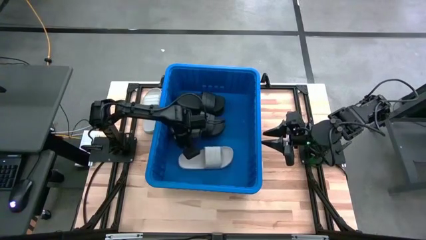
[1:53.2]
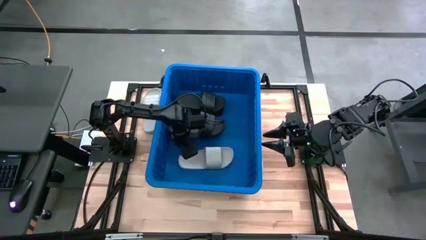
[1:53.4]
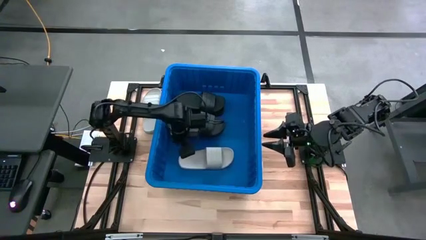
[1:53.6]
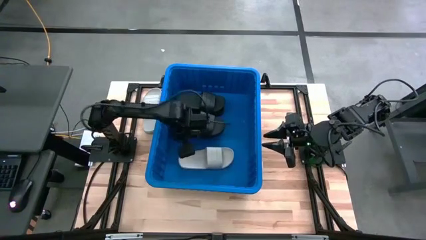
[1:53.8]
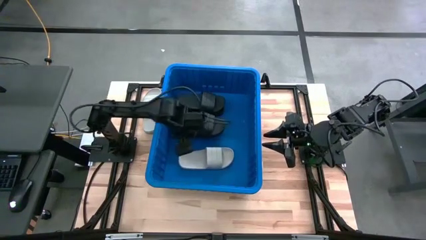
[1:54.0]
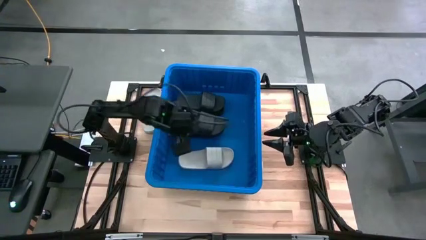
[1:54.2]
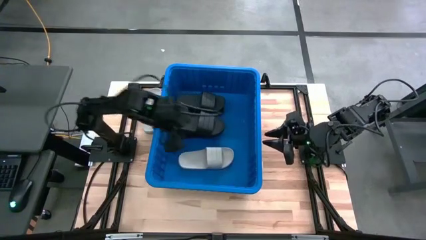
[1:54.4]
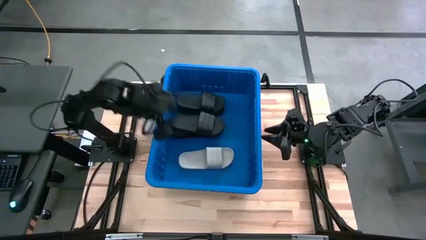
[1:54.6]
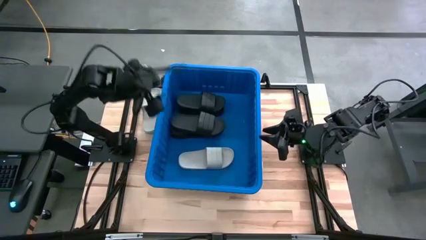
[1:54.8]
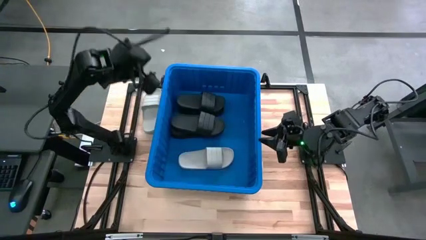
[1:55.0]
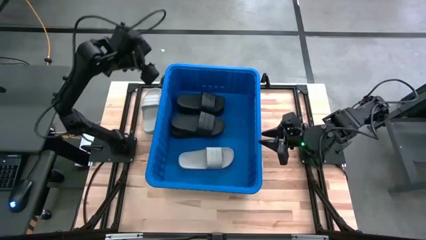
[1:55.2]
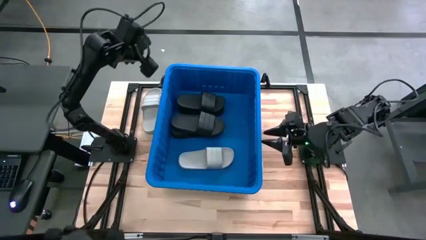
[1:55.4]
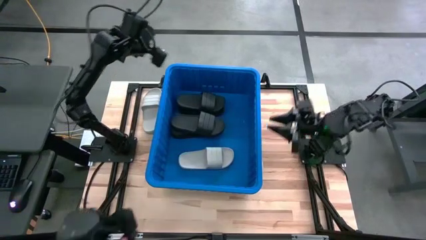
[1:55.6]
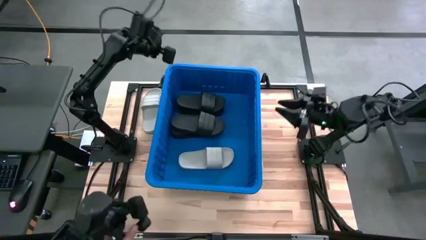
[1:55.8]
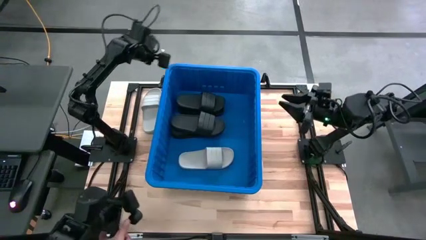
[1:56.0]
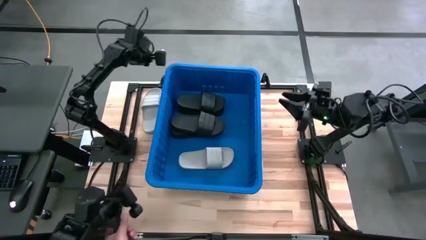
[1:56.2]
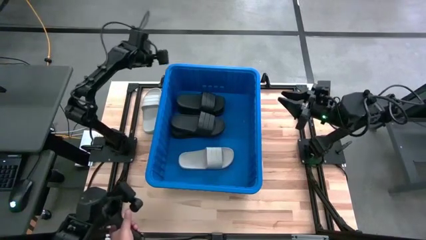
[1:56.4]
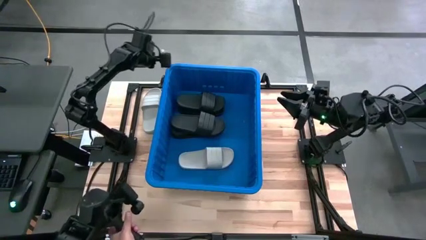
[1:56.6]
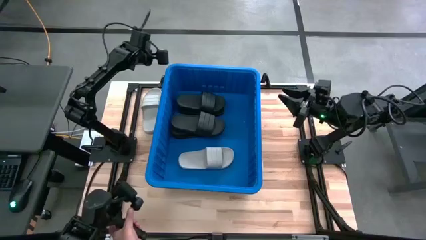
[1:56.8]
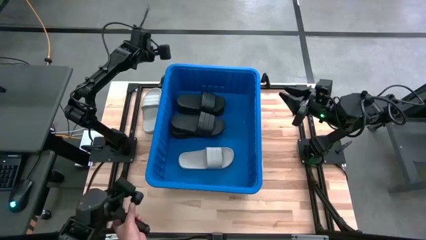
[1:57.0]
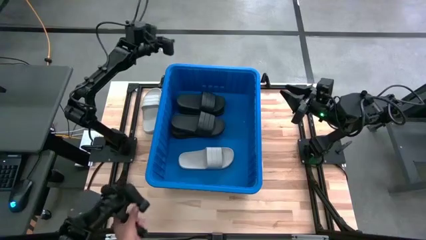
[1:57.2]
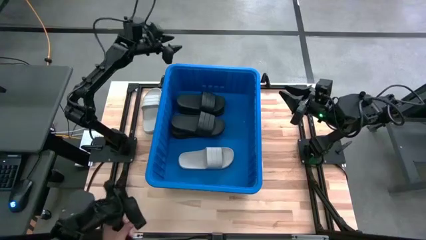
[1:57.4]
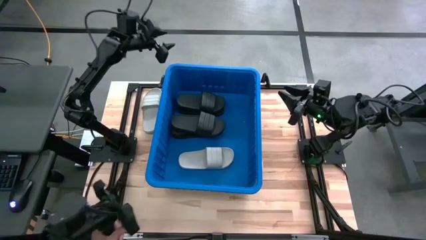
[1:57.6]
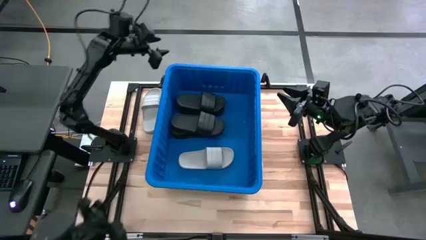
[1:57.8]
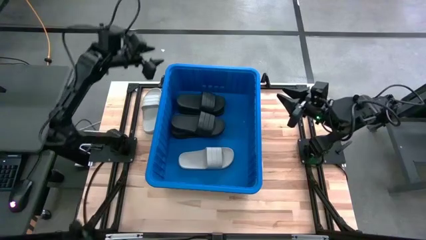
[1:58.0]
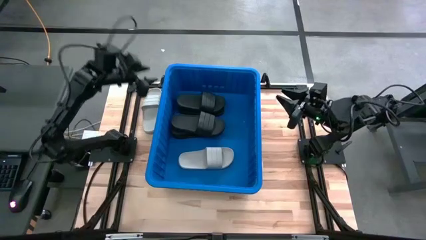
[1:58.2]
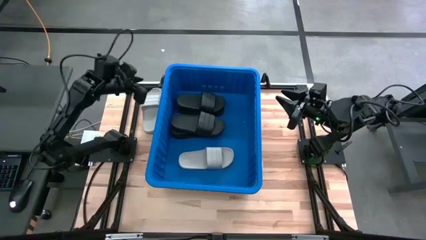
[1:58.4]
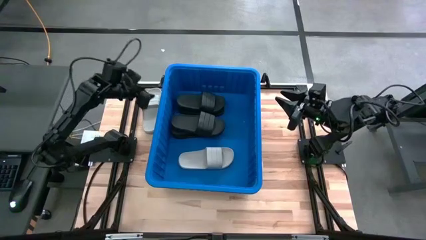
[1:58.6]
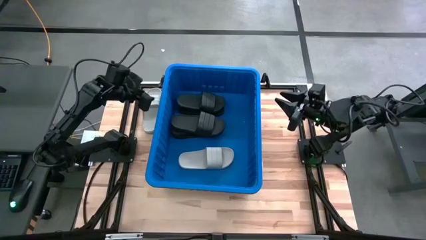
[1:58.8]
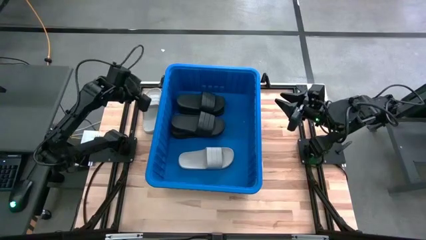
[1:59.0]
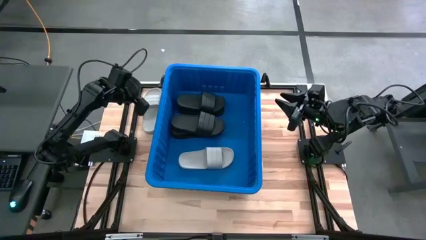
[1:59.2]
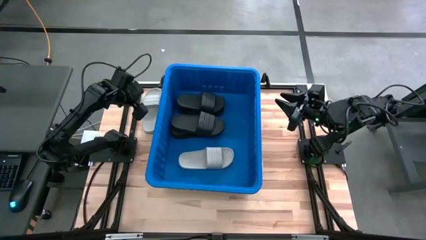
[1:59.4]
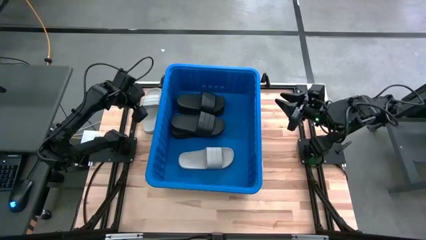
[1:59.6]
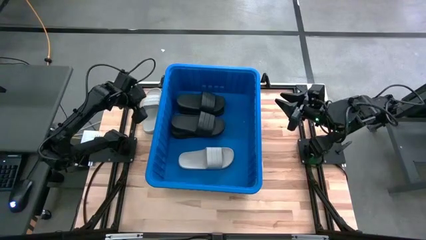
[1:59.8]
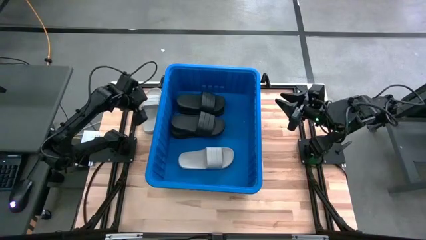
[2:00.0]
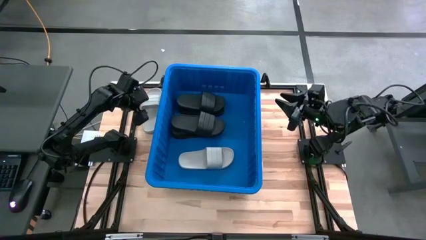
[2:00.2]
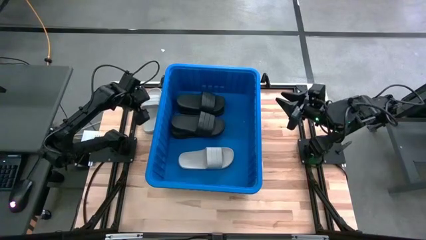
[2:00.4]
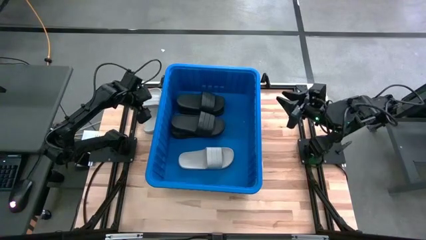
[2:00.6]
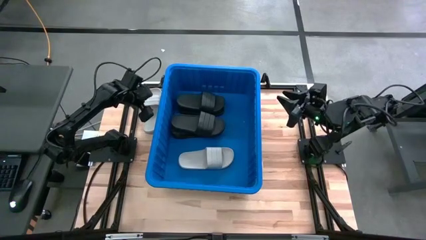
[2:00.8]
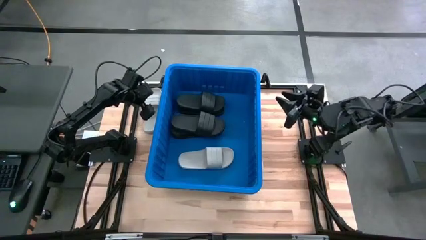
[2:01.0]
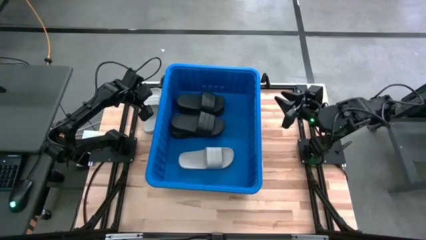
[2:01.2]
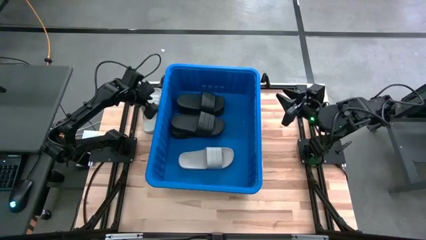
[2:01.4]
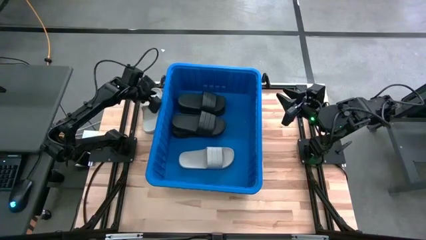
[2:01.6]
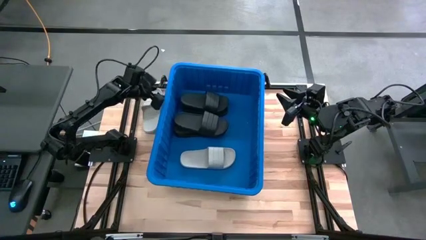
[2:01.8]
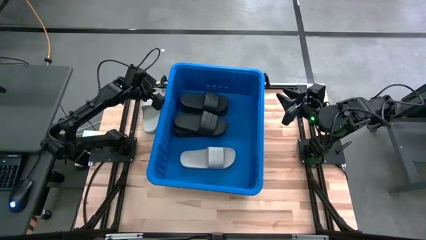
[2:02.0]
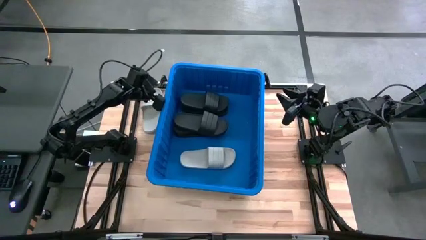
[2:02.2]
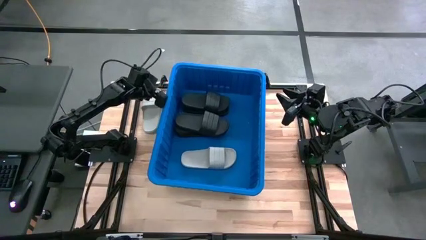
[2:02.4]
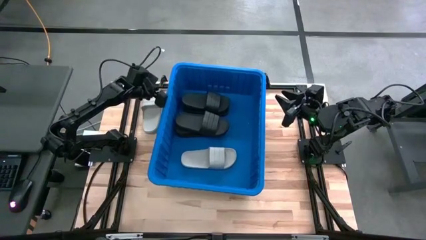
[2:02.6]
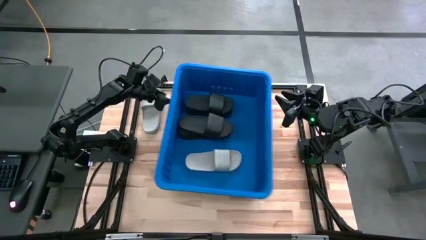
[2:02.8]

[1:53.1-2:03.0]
Task: Pick and place slides into bin
Adjust the bin

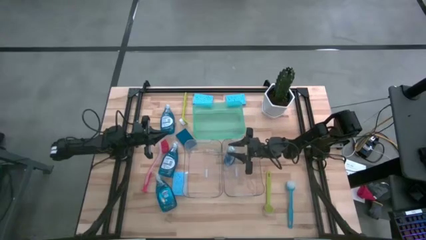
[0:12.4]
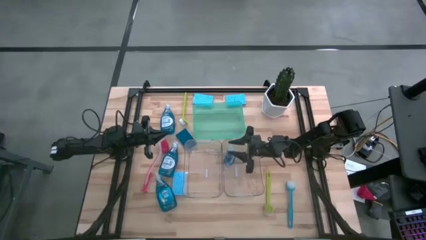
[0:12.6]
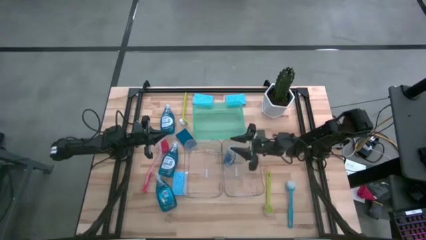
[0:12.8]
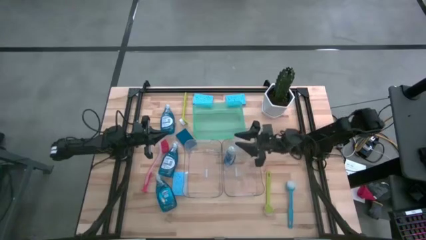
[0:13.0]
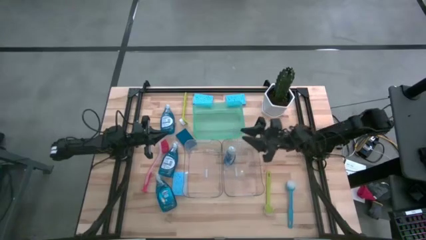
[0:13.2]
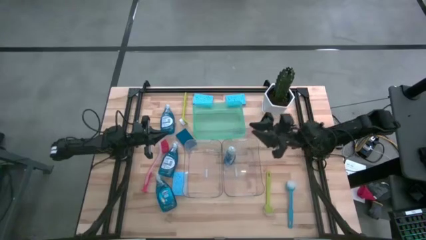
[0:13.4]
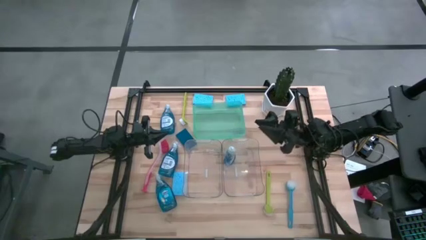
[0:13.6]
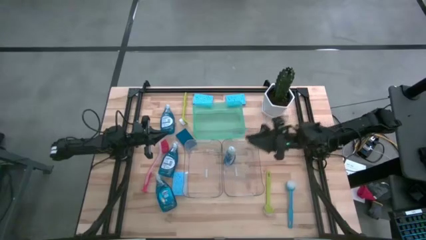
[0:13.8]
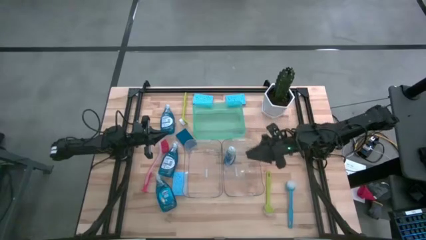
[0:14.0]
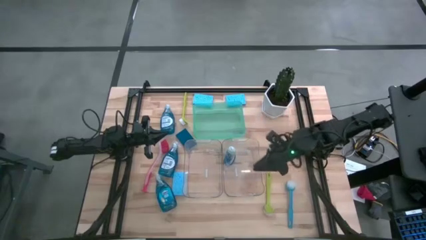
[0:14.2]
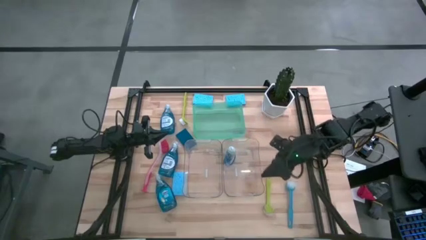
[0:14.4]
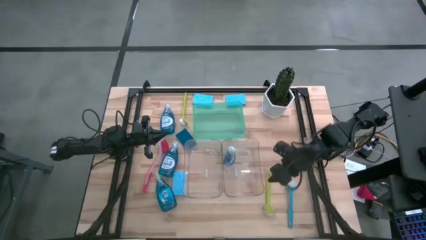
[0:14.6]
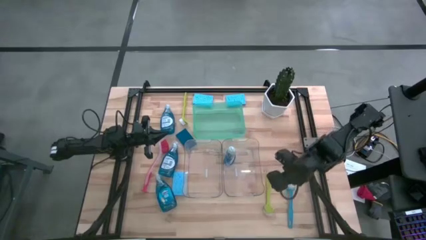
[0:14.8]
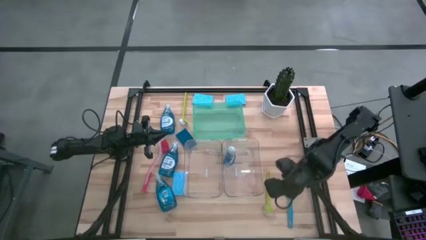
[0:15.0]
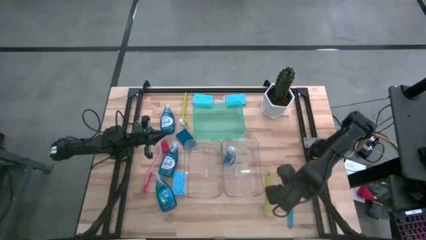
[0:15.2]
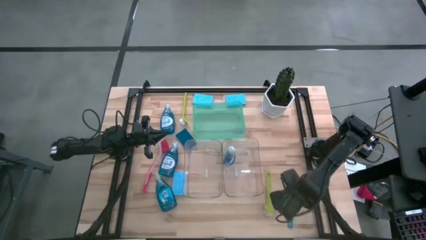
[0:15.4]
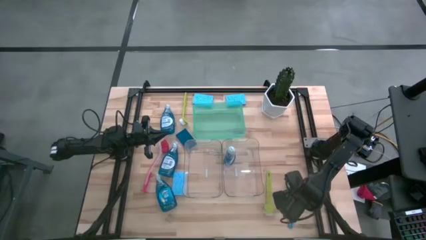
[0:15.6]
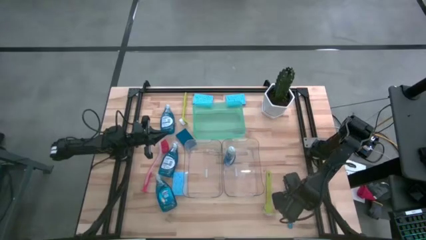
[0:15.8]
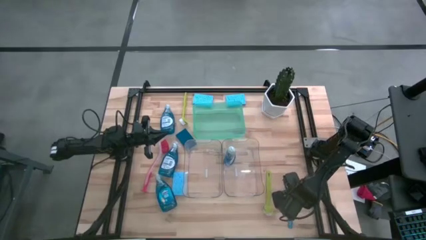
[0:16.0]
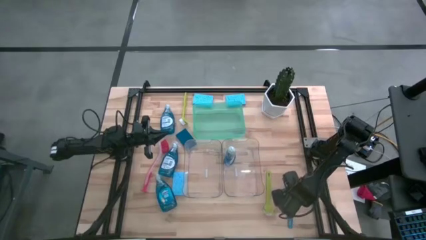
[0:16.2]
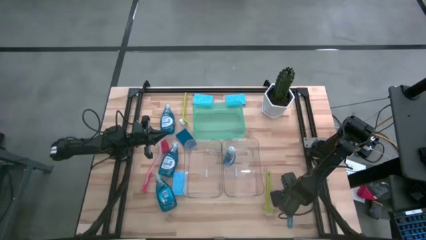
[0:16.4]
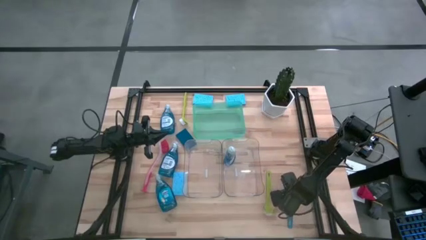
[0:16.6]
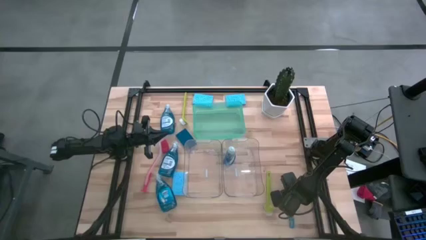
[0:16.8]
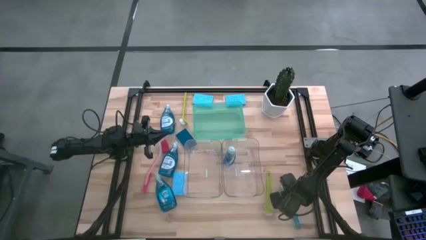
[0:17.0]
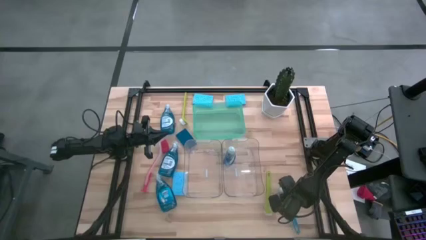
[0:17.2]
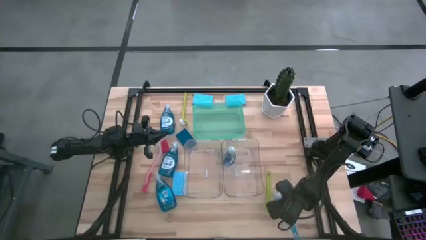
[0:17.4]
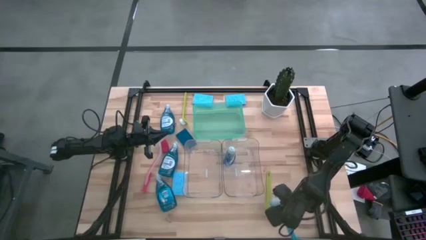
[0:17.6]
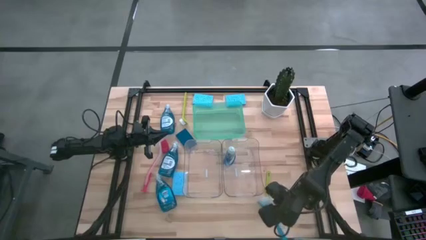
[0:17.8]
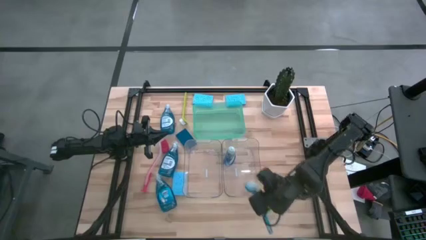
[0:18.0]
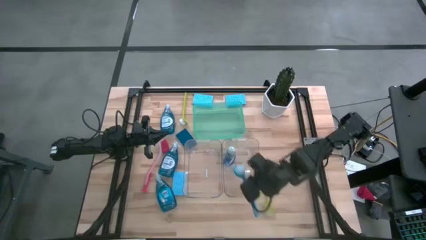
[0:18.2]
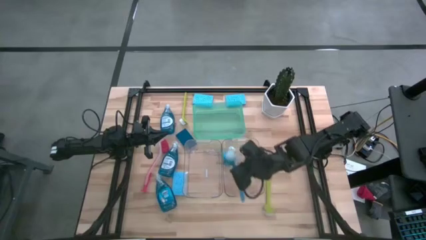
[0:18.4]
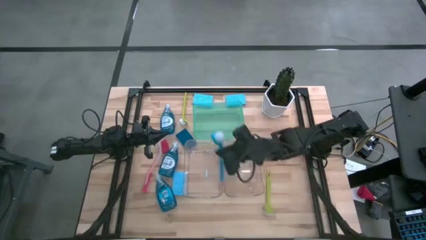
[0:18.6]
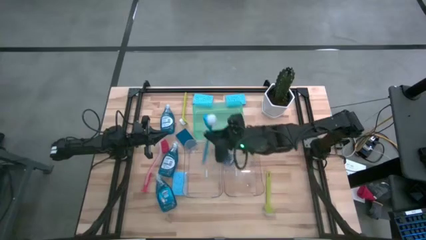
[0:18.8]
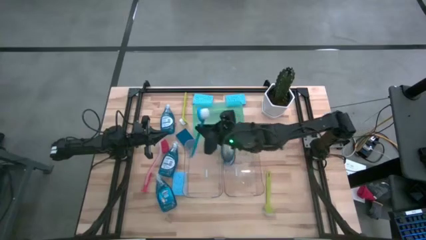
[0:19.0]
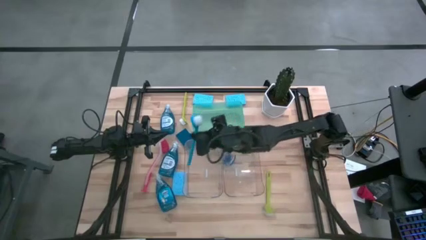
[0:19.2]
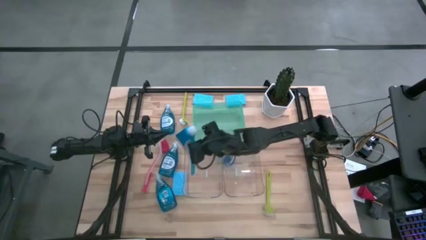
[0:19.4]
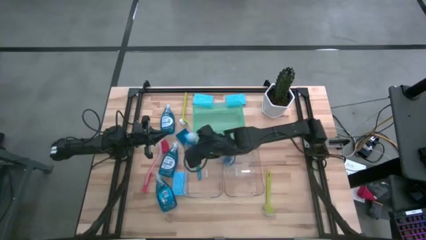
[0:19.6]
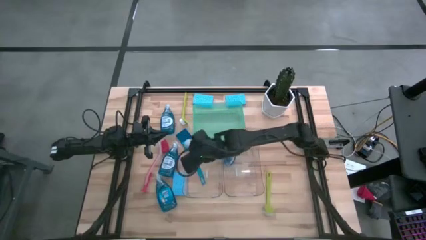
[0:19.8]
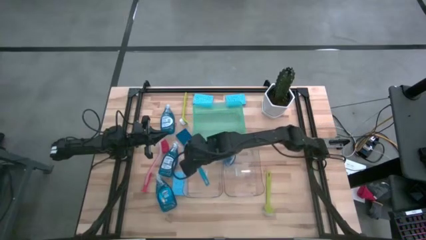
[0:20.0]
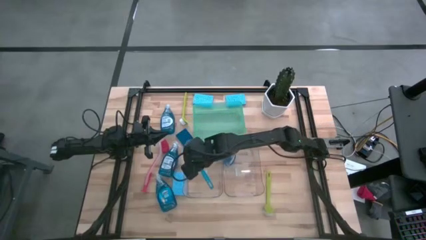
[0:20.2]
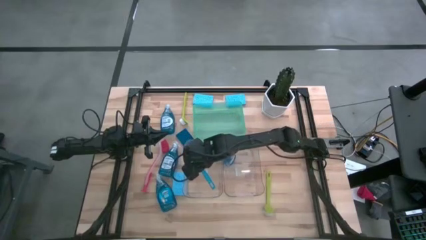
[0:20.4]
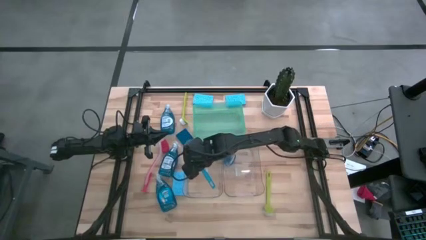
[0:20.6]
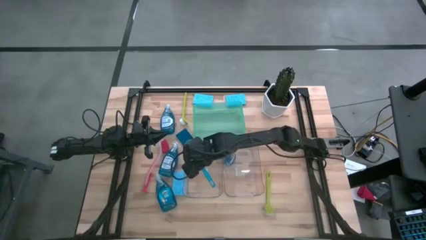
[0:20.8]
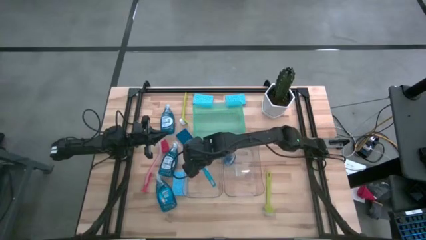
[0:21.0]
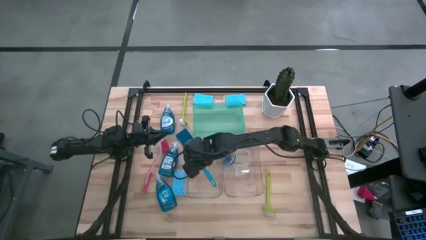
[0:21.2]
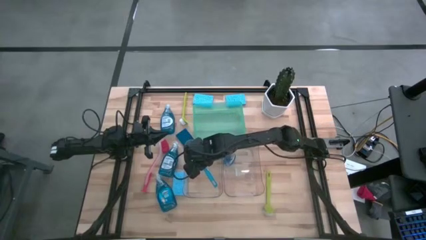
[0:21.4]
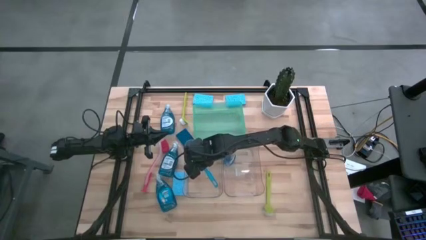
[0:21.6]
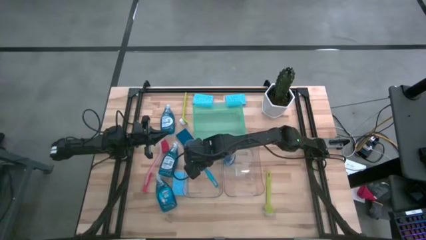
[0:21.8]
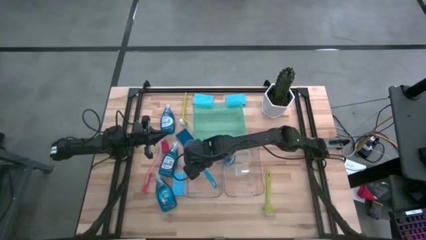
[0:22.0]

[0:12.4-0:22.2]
Task: Pick & Place Kitchen Sink Supplies
Put the blue toilet brush into the left transparent bin
